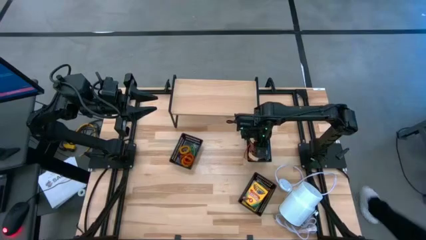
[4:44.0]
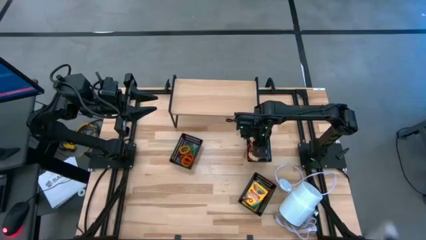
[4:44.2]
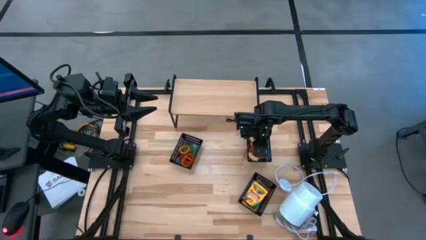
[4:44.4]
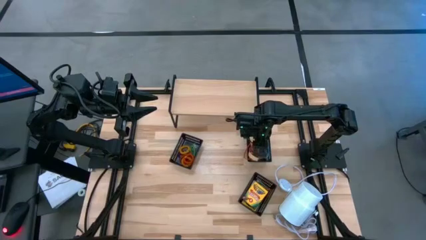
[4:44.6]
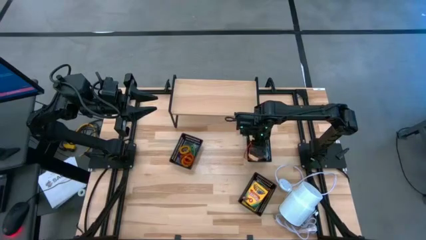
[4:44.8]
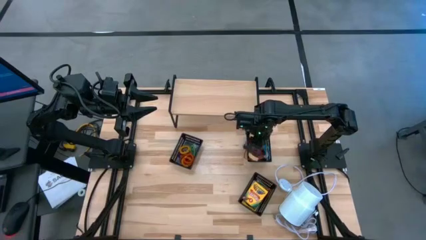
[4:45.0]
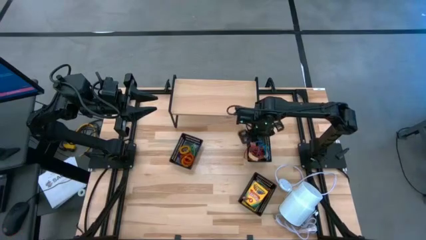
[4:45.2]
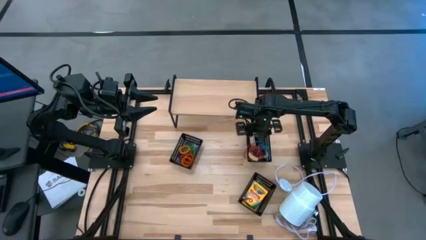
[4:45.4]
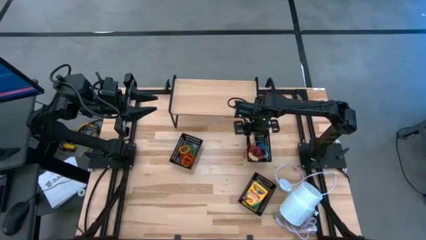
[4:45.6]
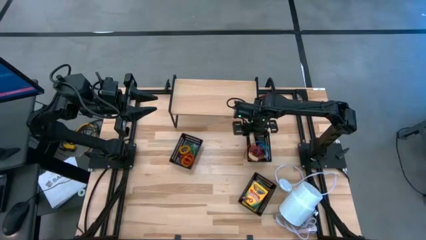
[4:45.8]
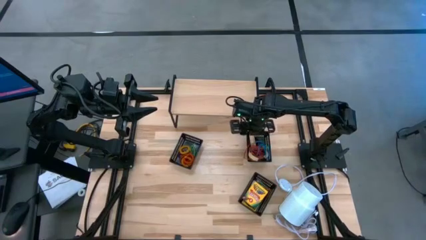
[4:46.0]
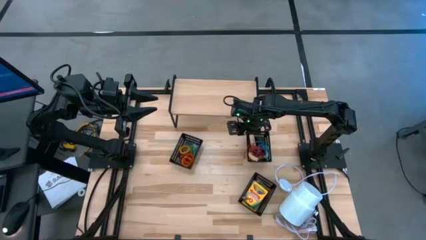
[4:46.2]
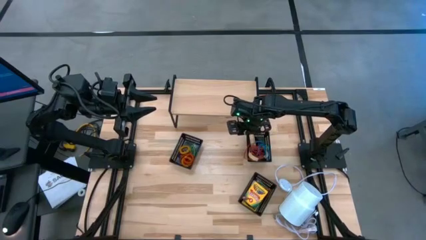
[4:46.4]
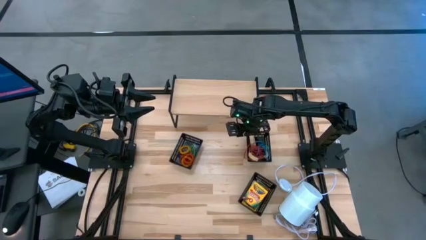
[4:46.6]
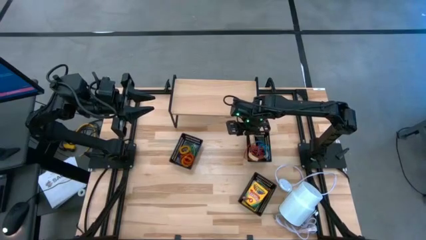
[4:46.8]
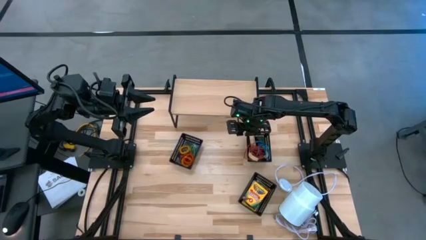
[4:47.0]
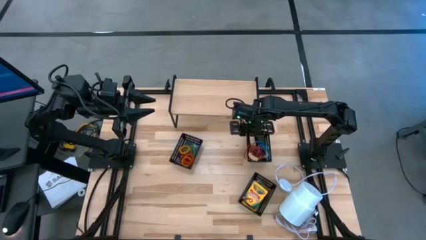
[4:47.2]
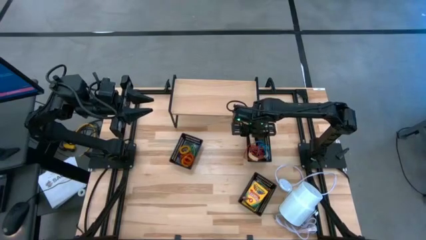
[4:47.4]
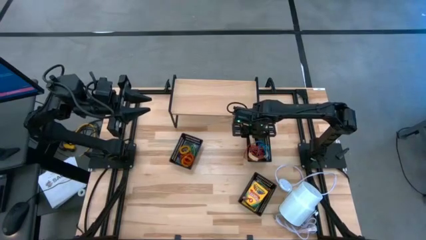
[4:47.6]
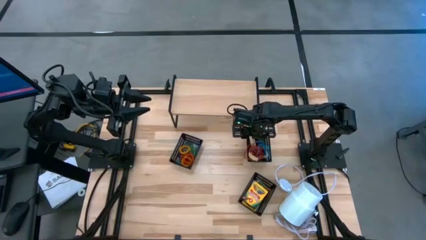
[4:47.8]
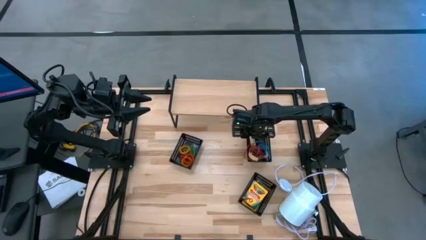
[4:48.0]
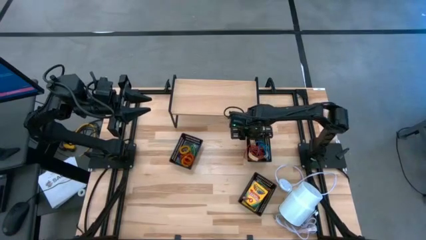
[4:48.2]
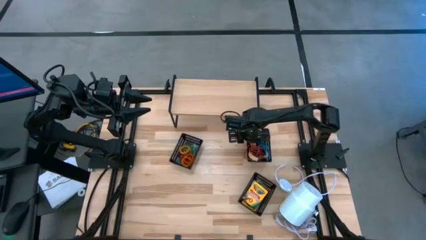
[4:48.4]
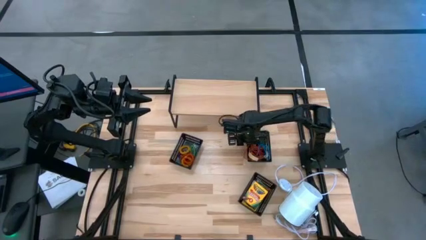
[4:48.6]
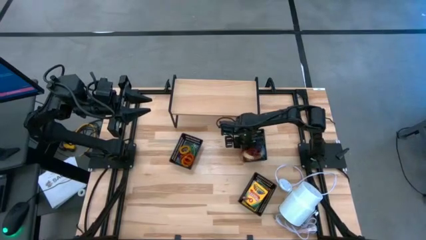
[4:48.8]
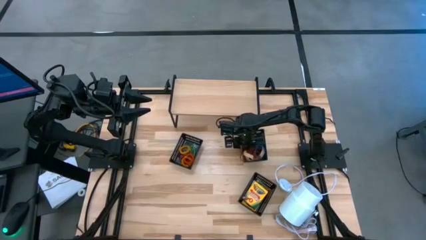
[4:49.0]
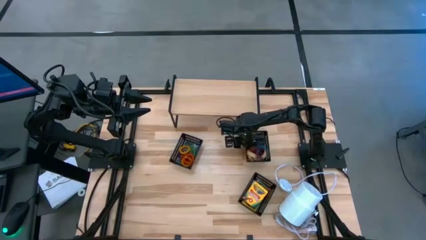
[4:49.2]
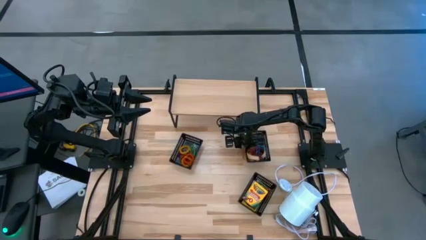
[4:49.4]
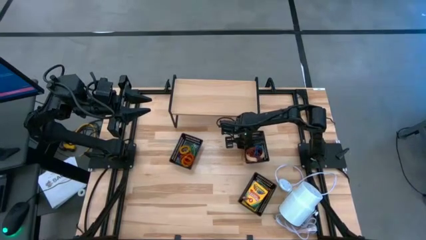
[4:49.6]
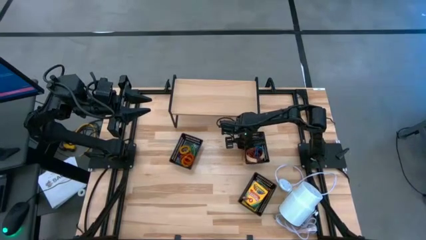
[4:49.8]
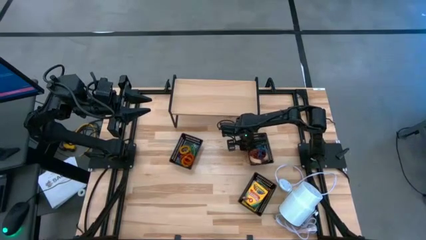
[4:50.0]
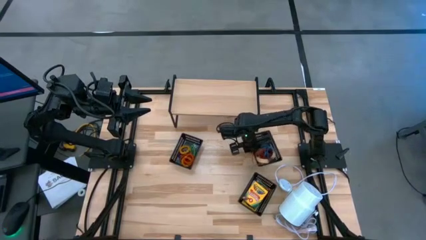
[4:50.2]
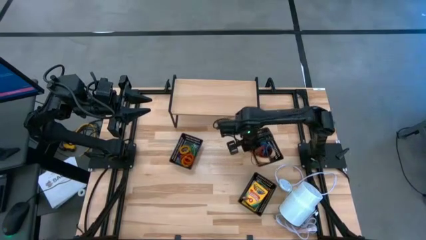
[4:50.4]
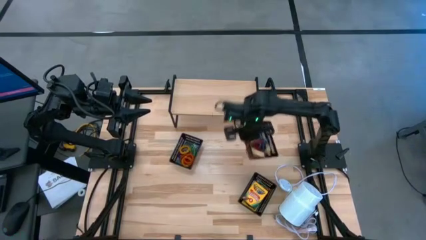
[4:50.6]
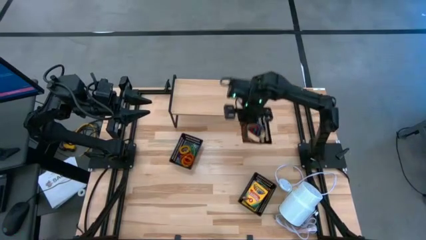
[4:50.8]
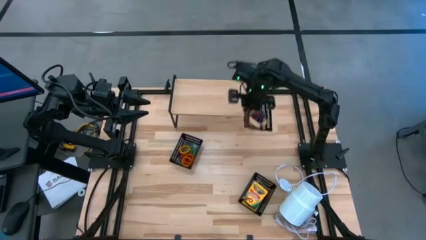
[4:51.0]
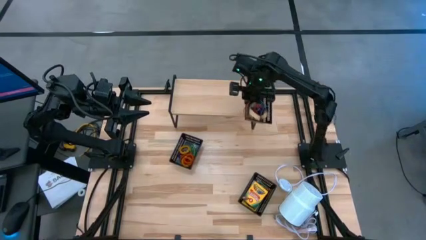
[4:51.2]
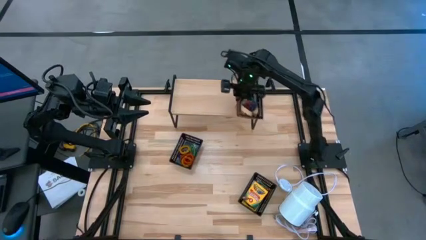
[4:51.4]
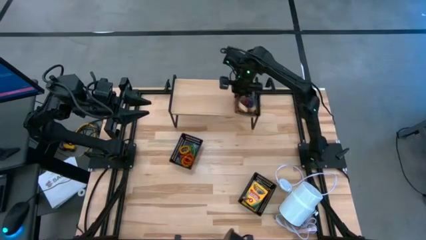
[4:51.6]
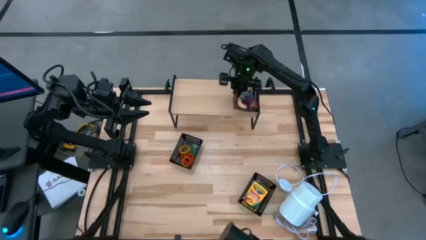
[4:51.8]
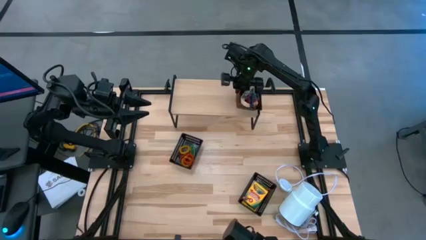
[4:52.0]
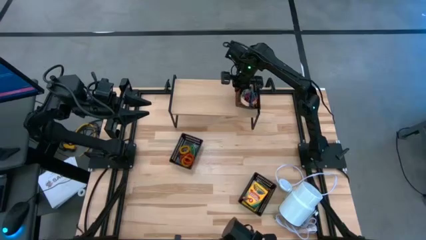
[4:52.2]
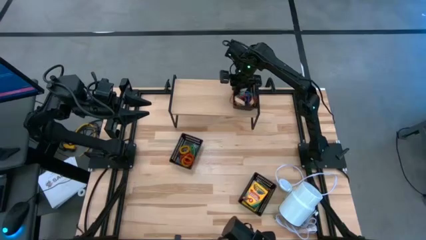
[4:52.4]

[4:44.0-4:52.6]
Task: Pick & Place Office Desk Supplies
Put the top right black bin on the shelf

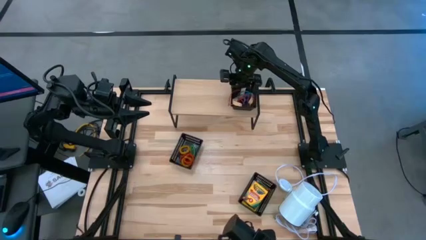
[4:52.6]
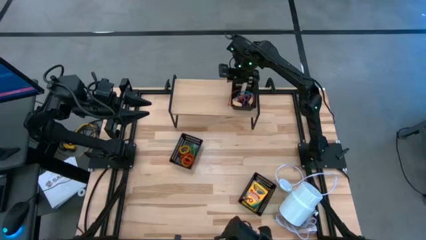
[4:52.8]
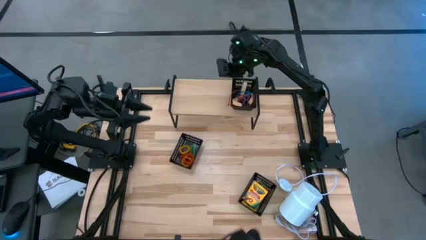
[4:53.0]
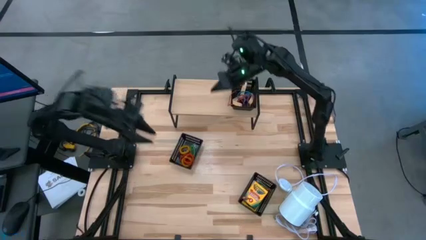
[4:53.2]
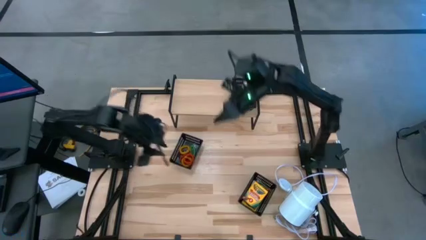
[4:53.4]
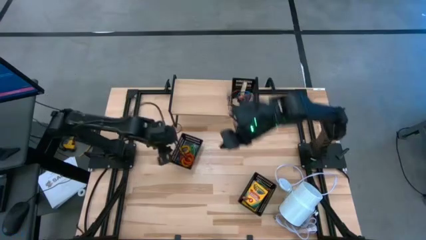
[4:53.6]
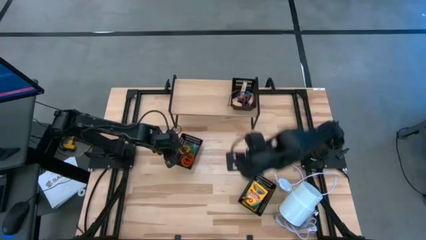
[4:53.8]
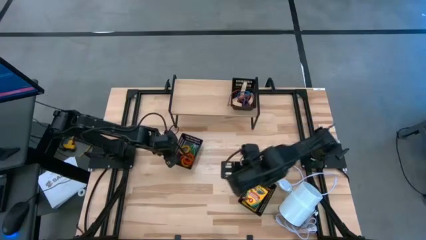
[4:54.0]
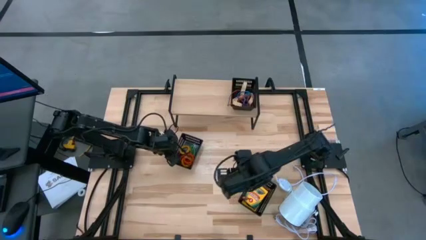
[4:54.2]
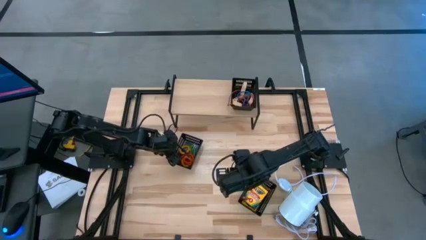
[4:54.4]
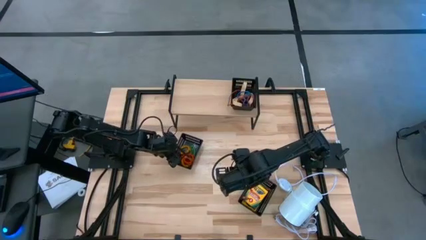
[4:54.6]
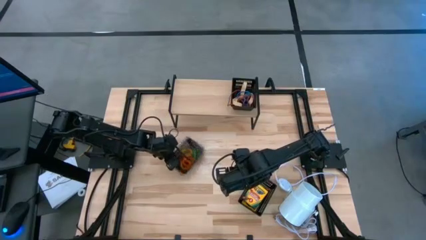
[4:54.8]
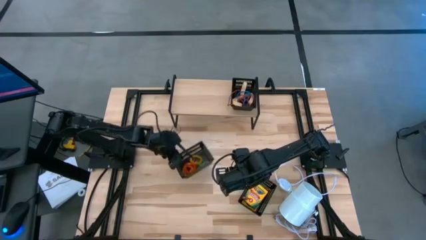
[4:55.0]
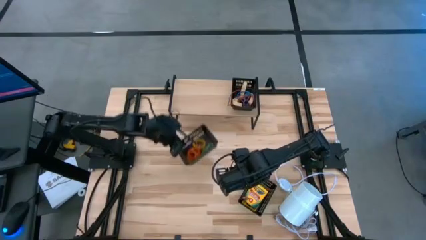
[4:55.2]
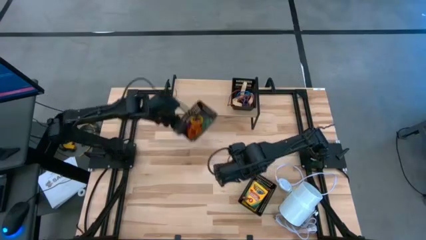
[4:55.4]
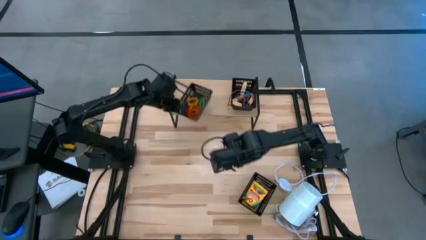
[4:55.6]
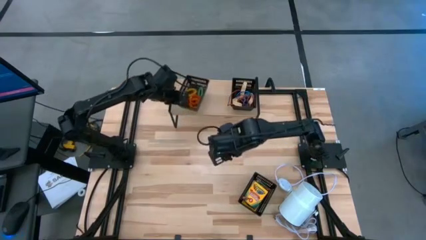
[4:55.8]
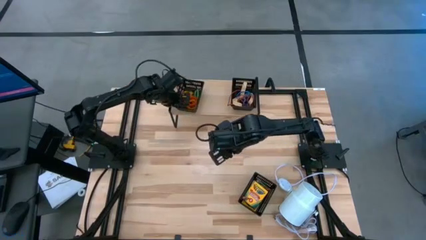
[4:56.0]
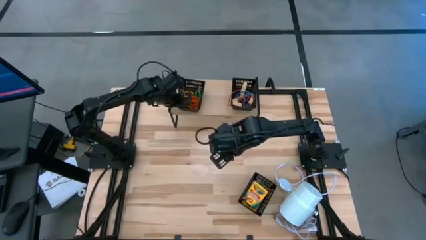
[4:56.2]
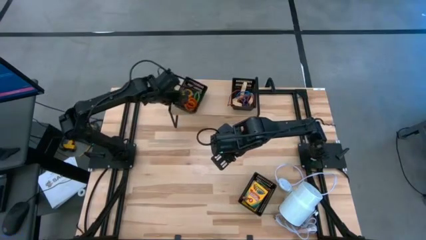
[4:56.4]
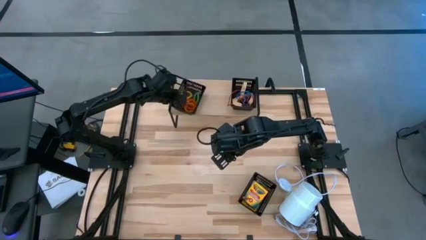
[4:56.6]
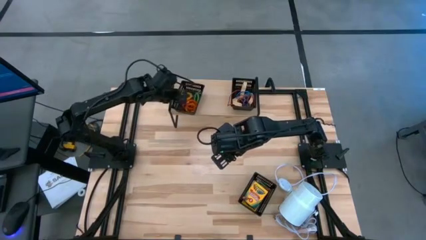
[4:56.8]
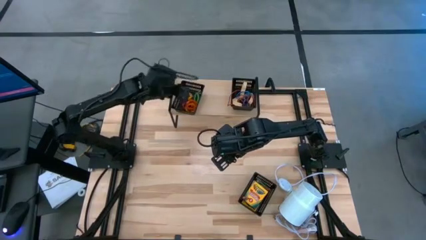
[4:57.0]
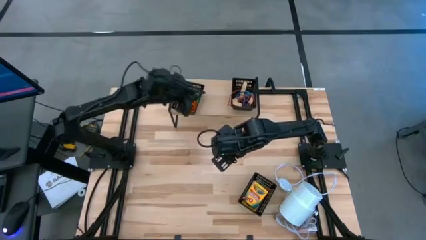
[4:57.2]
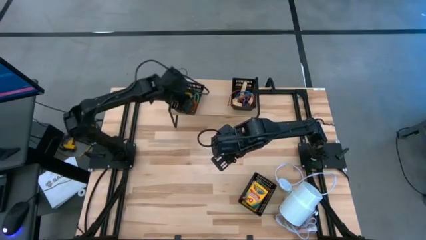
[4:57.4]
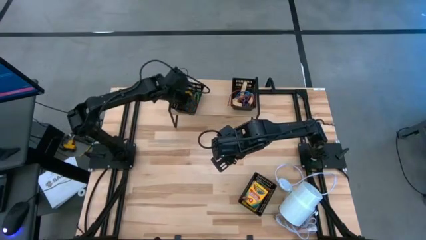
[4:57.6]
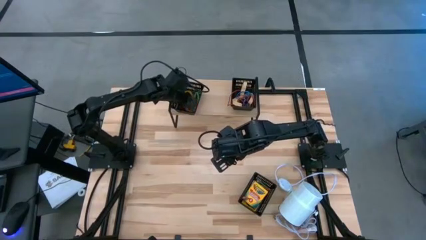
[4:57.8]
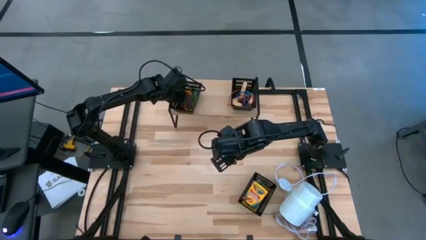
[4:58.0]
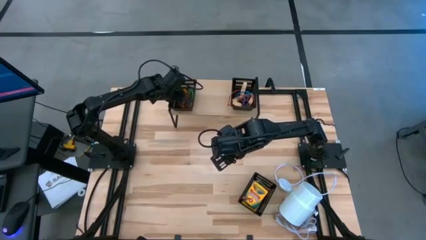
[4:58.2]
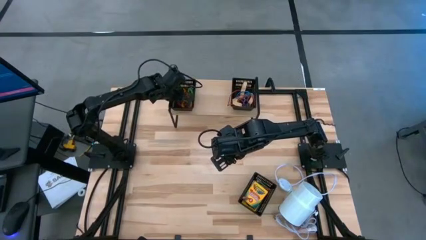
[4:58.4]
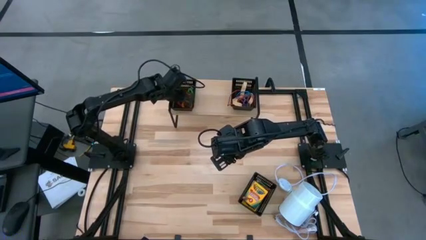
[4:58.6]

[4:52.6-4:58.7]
Put the left black bin on the shelf

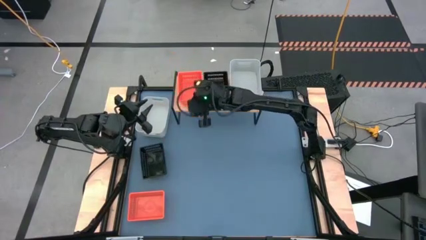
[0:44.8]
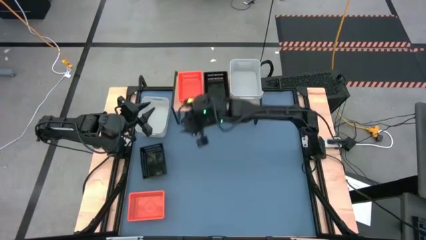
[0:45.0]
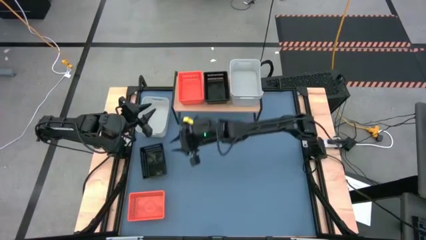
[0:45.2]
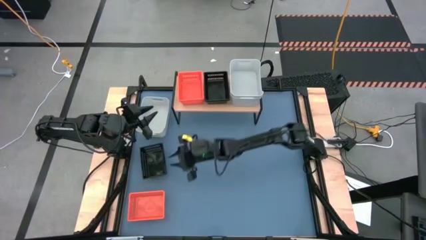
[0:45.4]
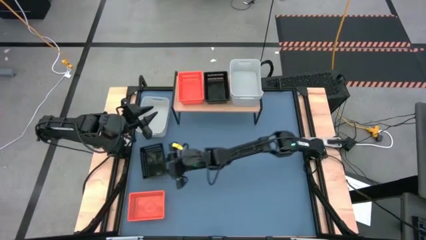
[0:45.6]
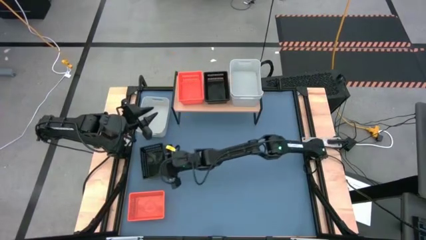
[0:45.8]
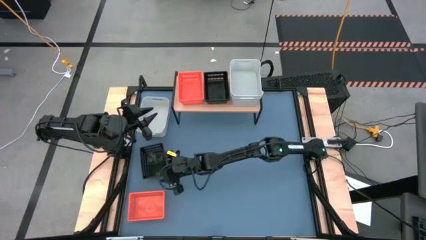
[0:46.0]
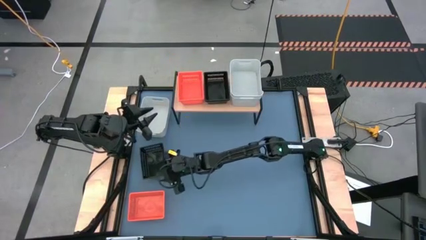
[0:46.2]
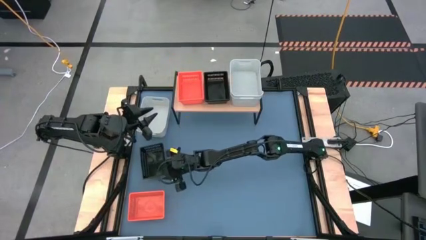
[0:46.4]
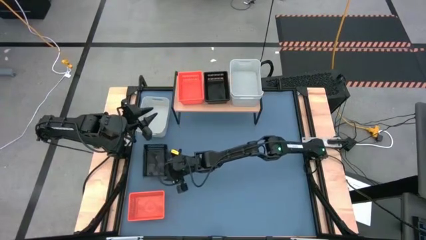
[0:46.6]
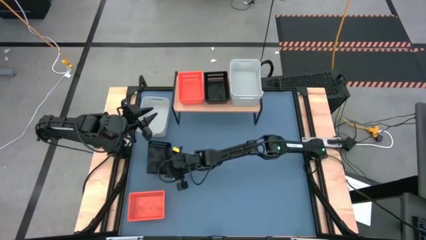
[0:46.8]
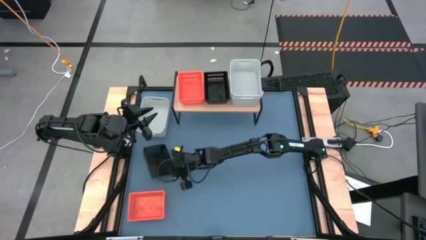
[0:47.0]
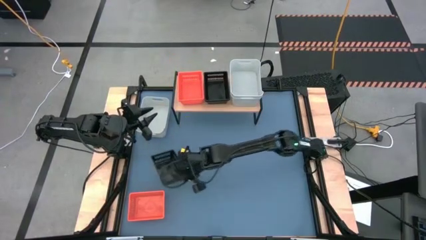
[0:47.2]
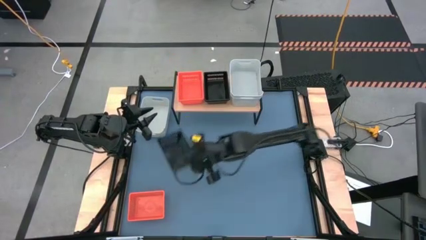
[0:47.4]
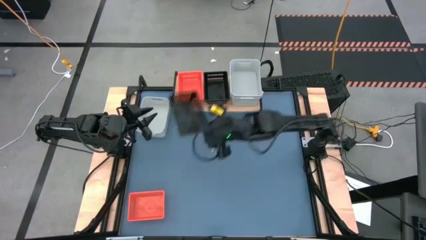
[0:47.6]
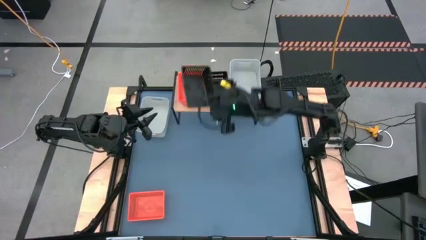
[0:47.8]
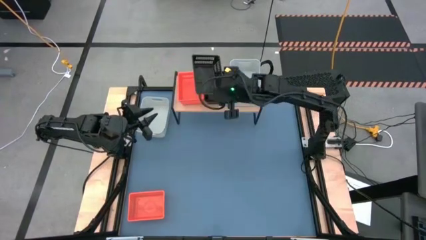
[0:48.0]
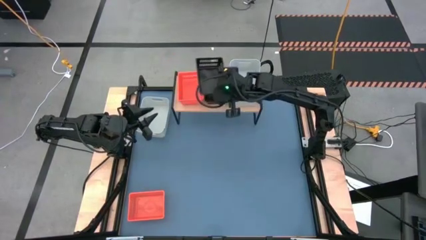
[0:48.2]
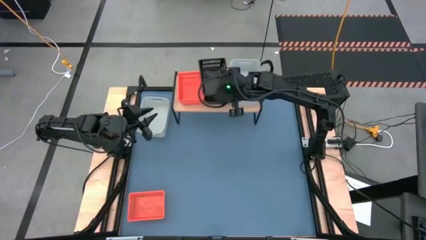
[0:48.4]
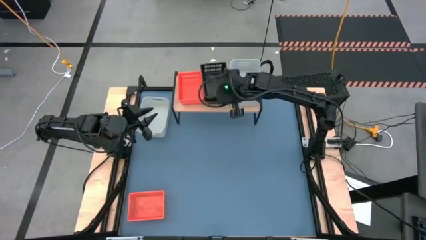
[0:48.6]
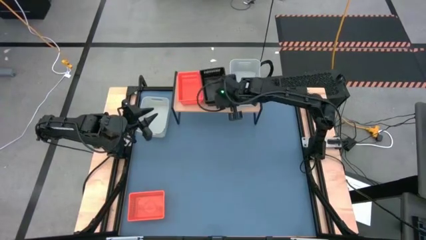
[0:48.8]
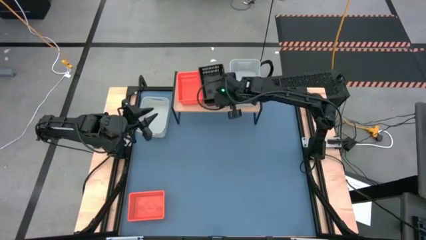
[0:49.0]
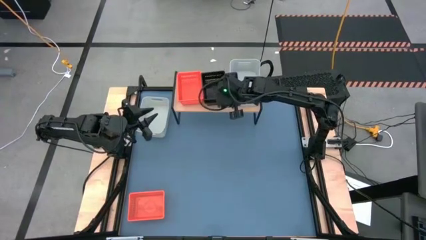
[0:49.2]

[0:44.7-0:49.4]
Task: Stack baskets on shelf by color
Stack the black bin on top of the other black bin on the shelf
